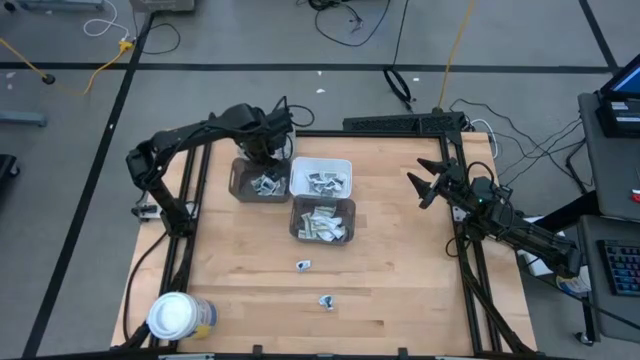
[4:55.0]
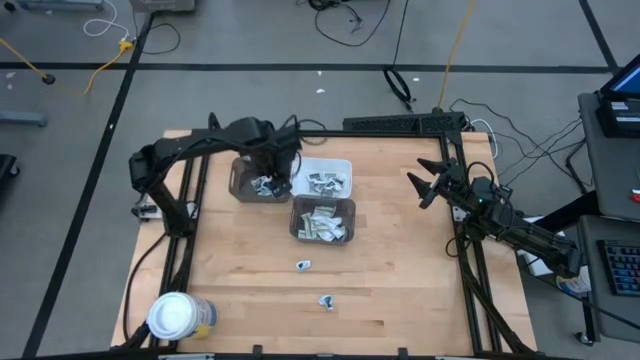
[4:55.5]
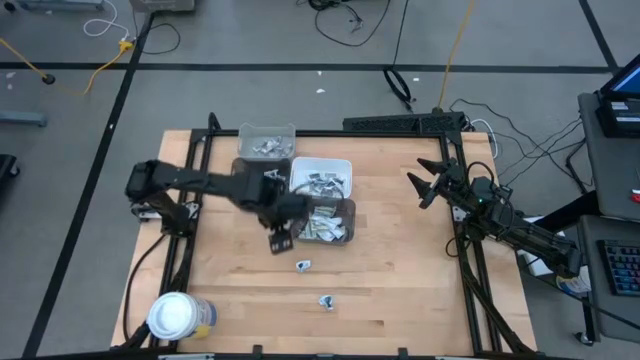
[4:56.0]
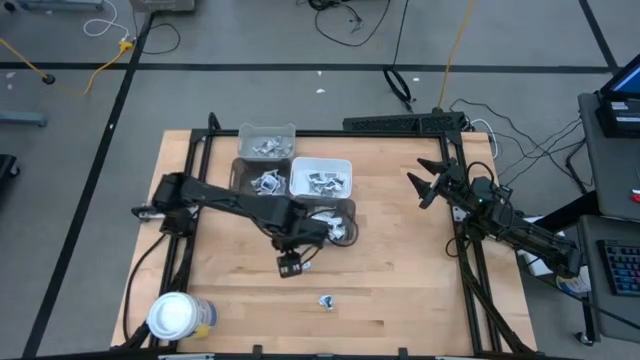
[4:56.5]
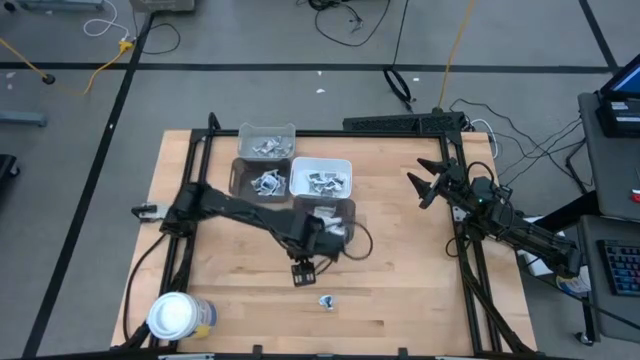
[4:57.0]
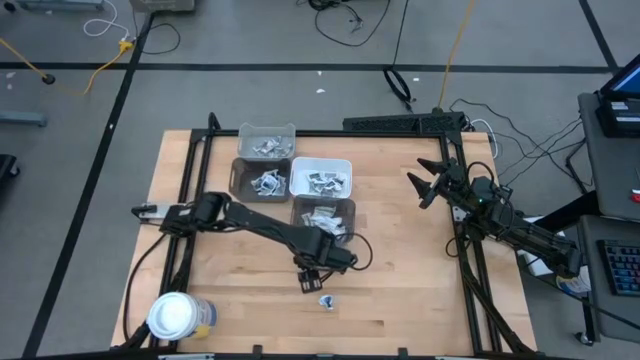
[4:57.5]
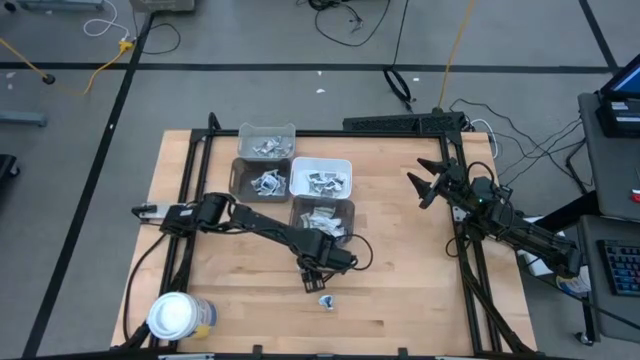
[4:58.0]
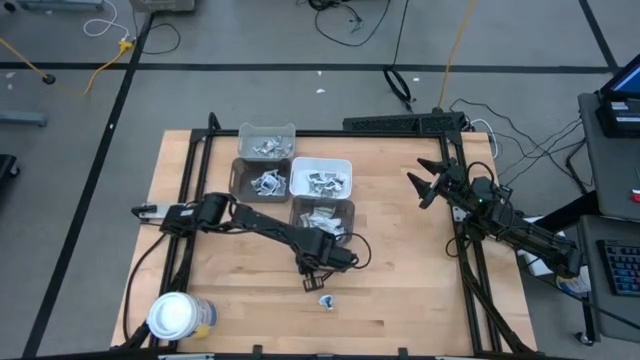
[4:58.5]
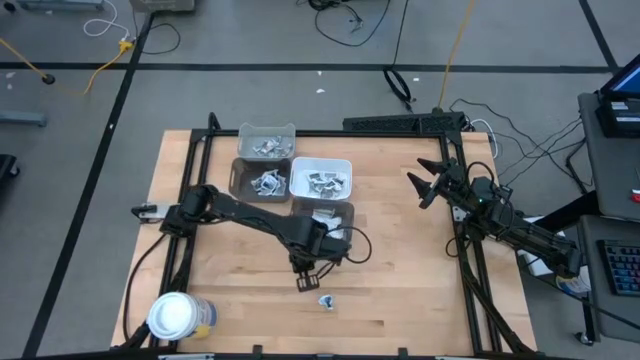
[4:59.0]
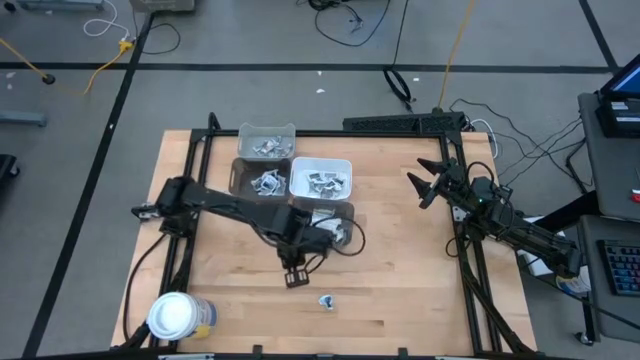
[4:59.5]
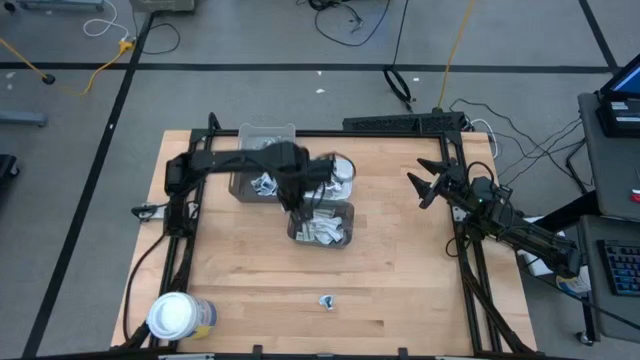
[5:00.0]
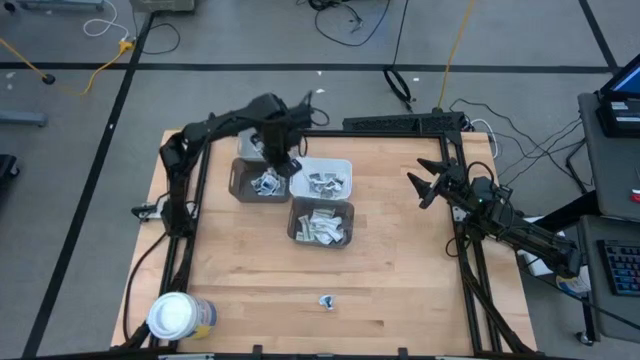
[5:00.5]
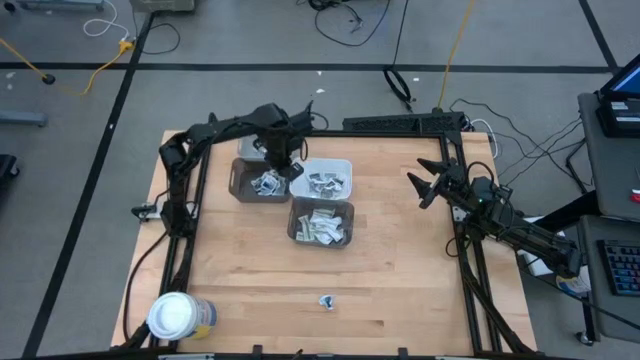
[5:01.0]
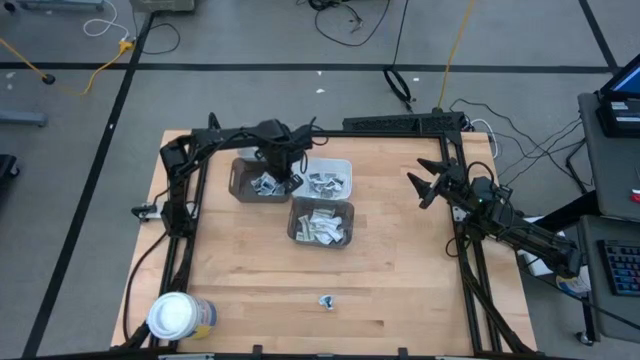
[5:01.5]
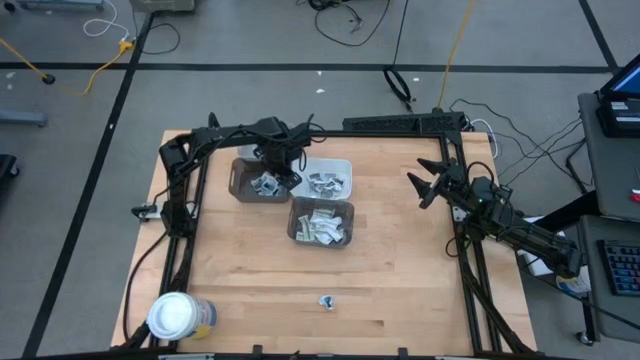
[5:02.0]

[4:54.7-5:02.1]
Task: Pick & Place First Aid Supplies
Put the blue alcohol pad into the left black bin

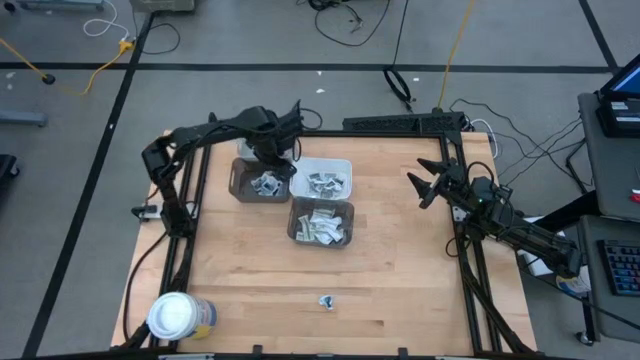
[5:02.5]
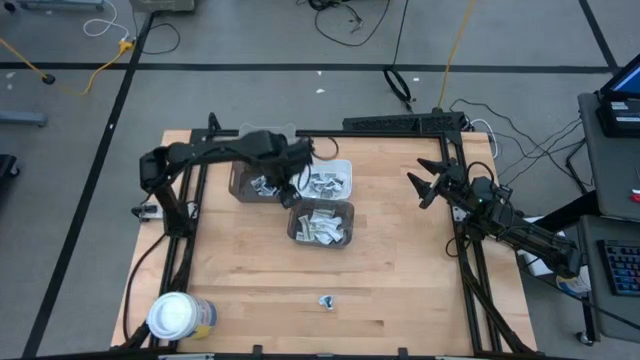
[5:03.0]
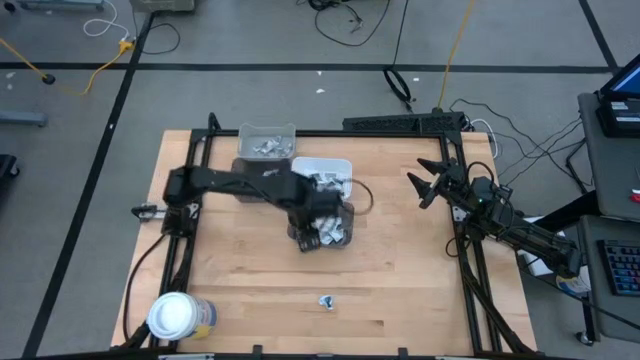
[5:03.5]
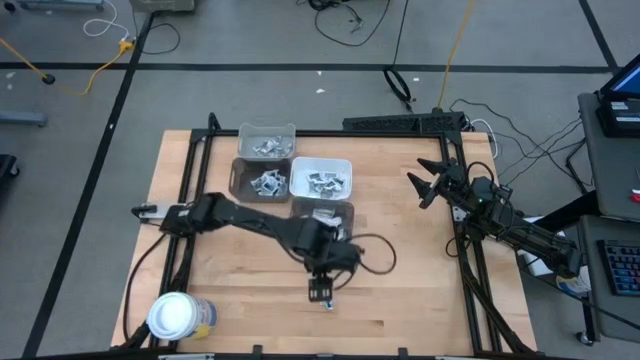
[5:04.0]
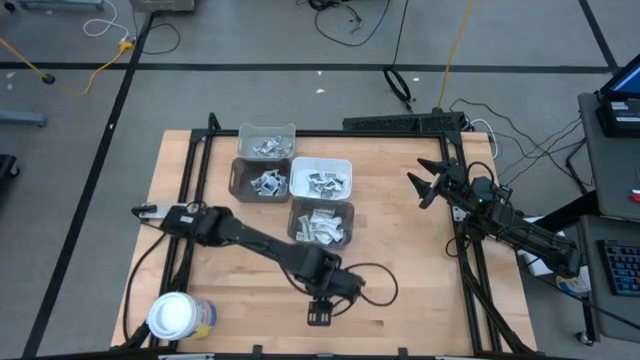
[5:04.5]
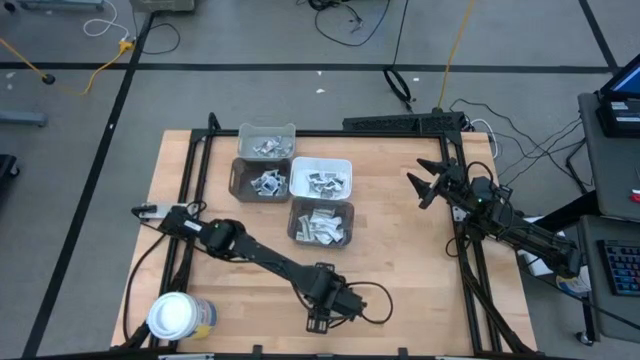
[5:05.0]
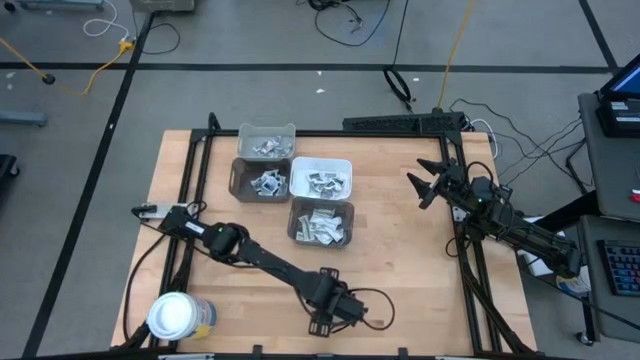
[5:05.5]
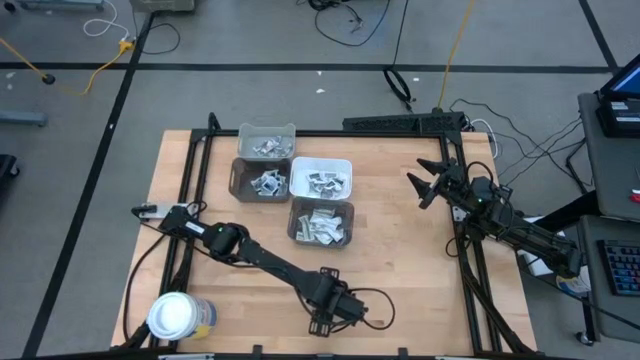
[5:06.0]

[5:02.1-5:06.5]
Put the blue alcohol pad into the left black bin

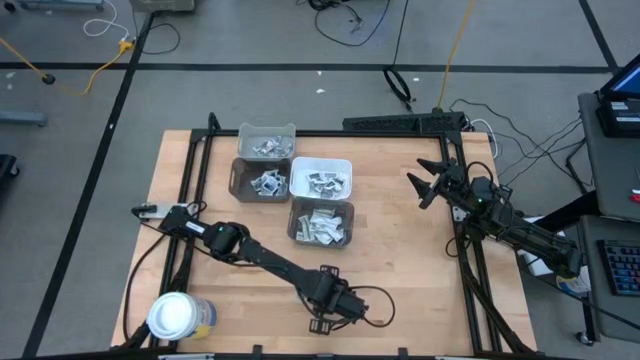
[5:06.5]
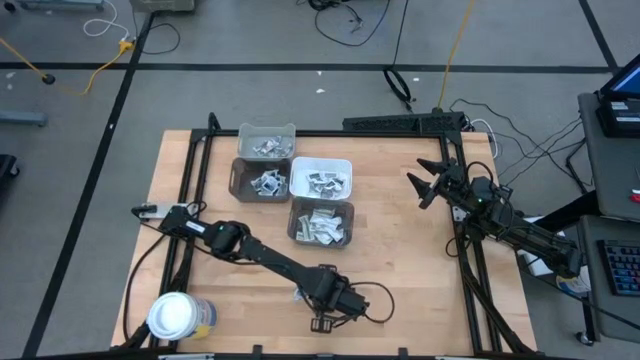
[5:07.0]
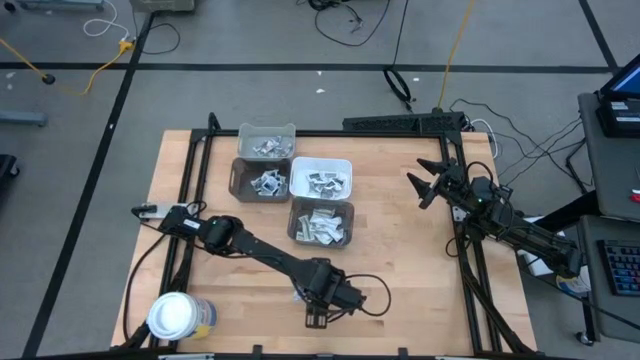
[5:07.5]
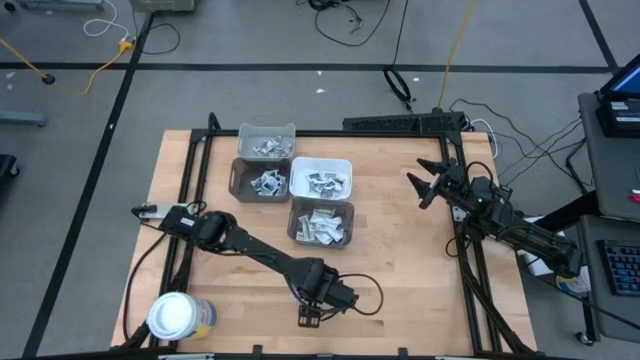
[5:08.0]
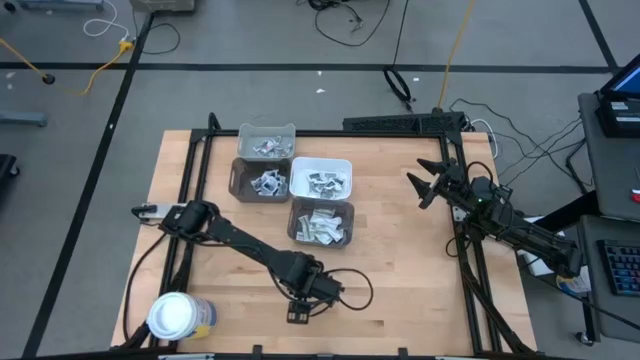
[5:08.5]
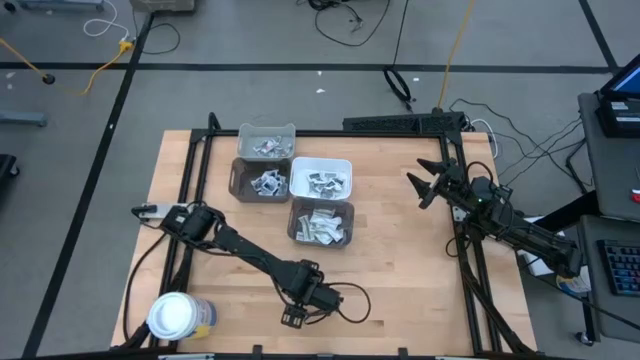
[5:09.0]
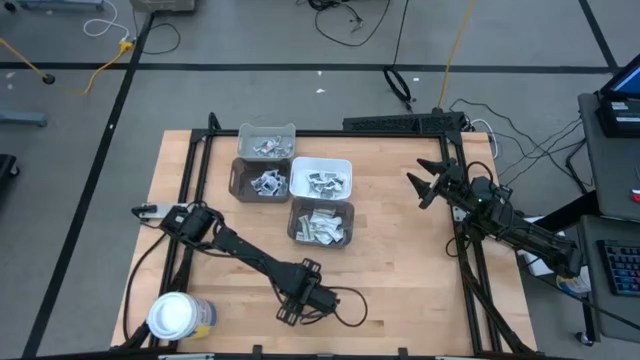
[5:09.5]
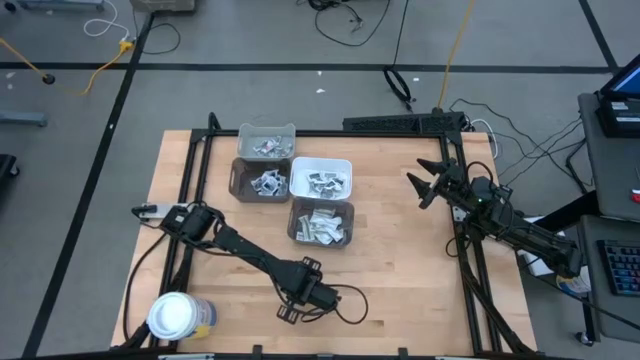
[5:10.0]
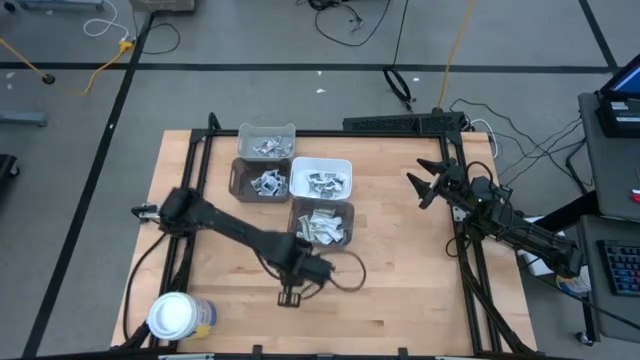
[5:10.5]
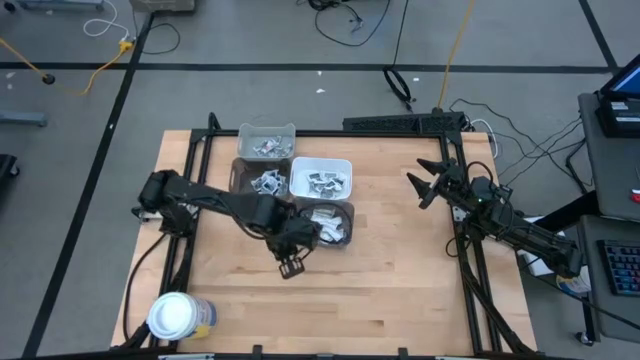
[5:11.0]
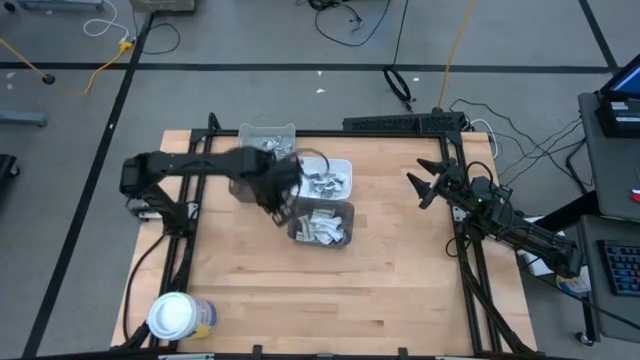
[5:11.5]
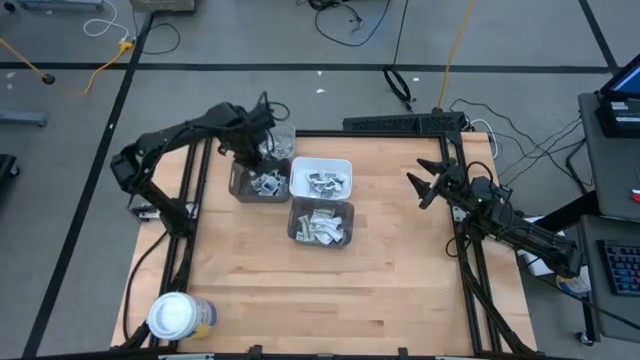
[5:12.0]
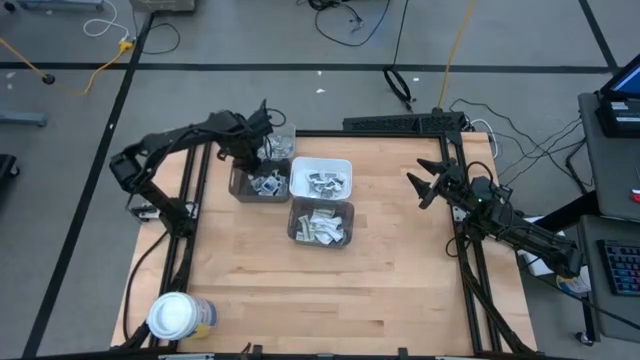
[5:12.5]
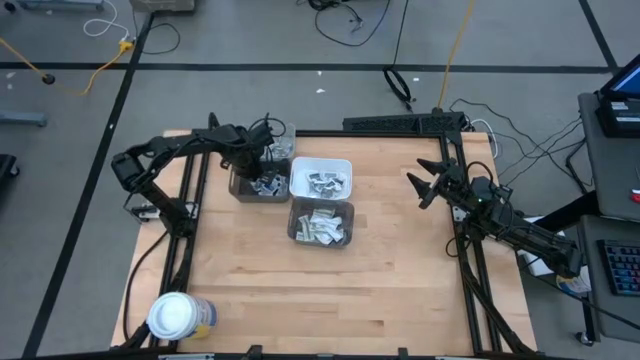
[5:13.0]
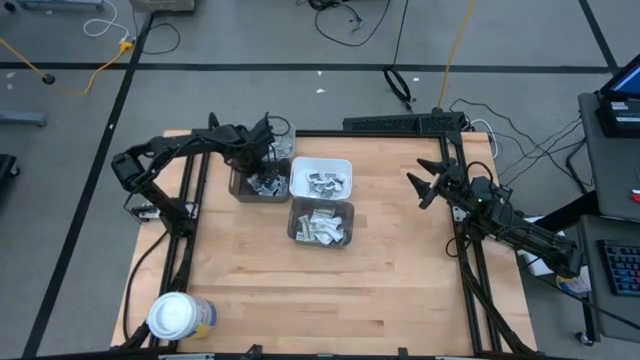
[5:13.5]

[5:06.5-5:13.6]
Put the blue alcohol pad into the left black bin
